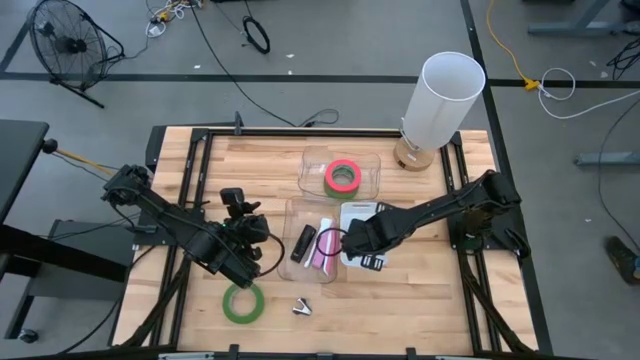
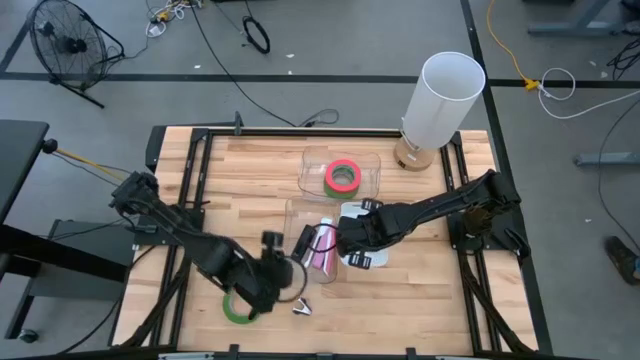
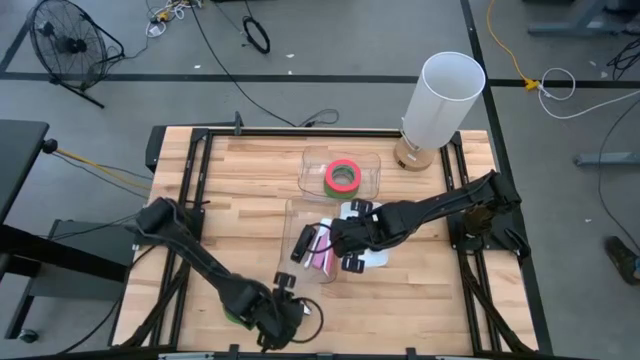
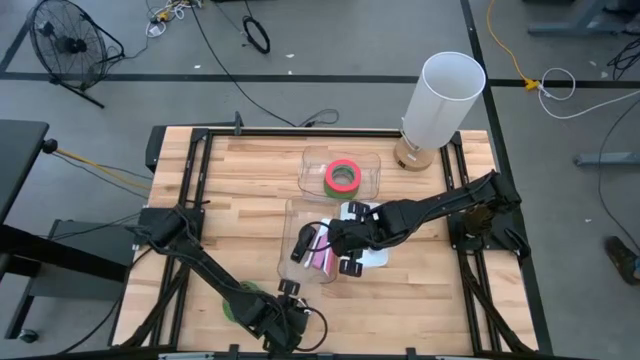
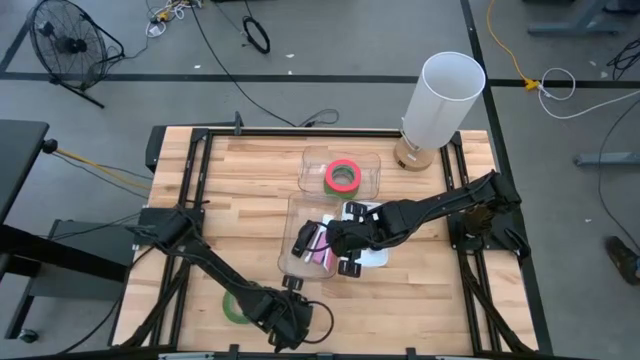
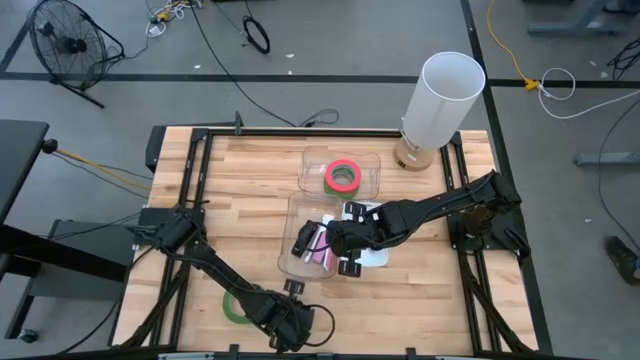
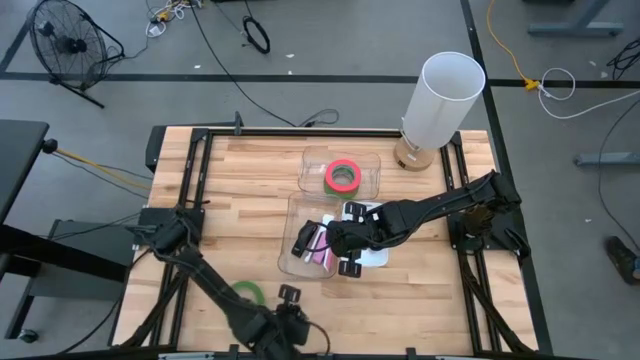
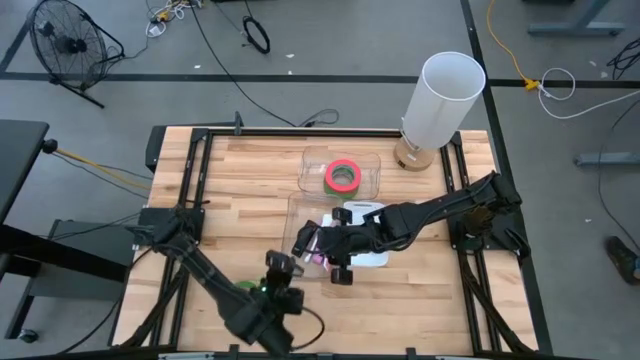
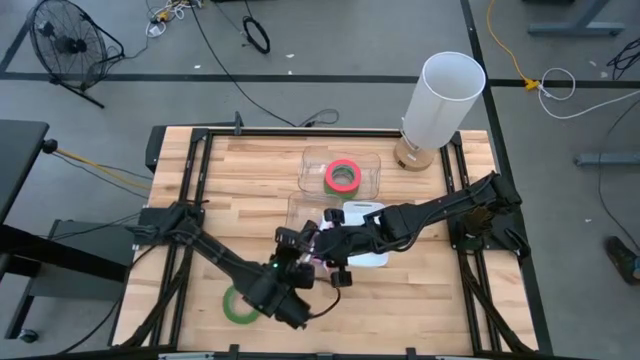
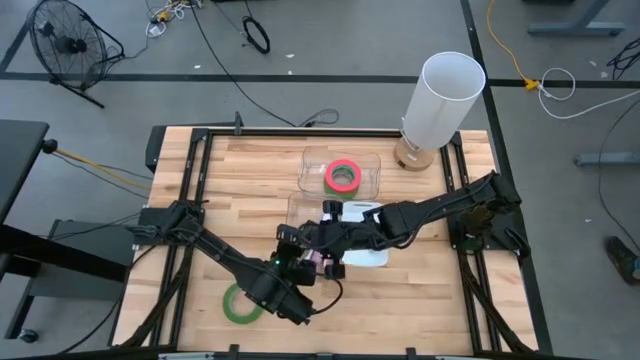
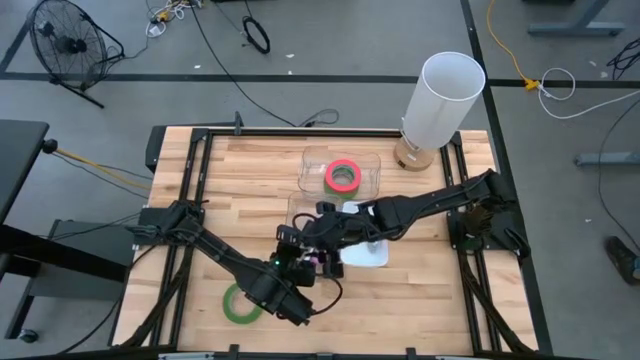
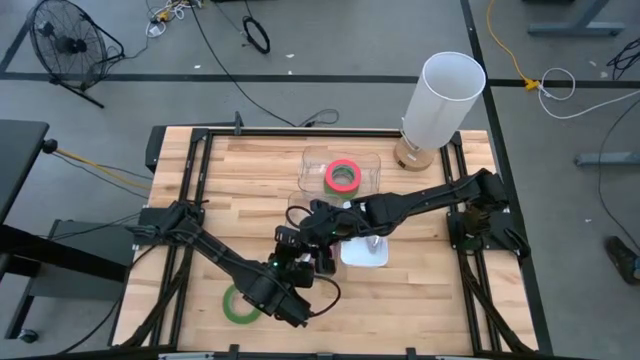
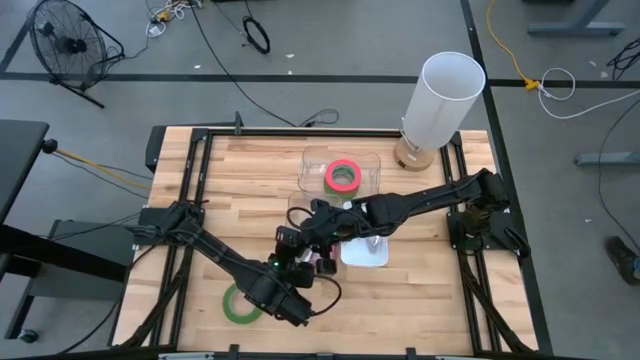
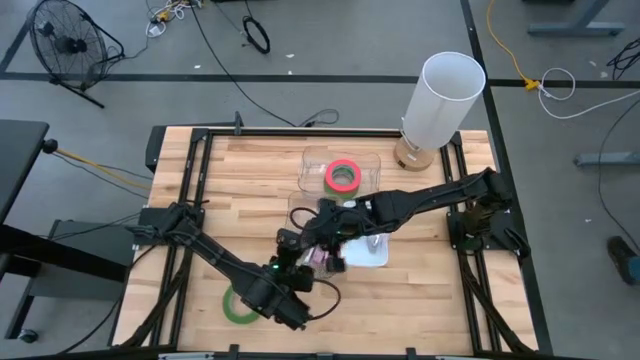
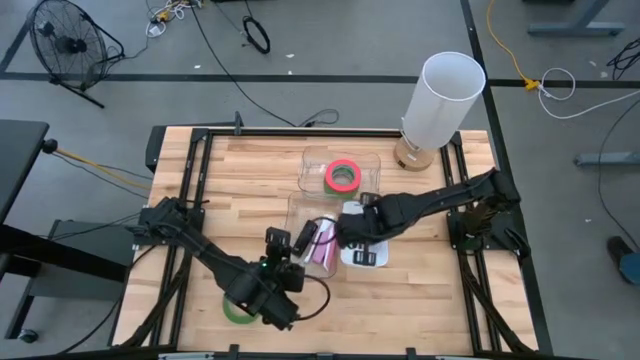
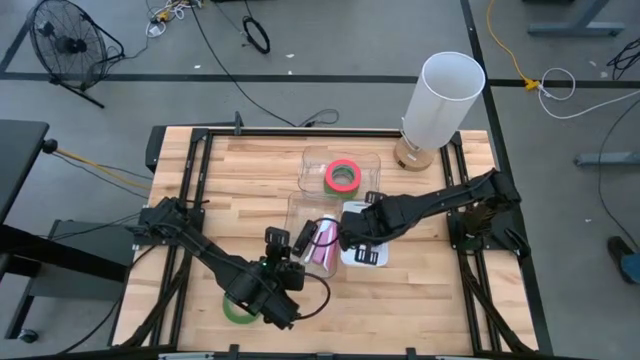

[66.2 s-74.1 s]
Task: Pick and place Stapler, Stapler remover, tape
Put the black staple remover into the white bin

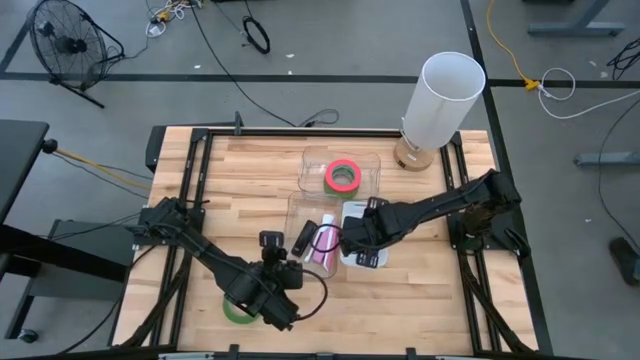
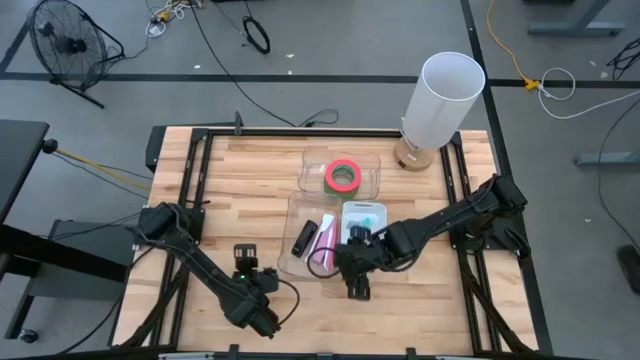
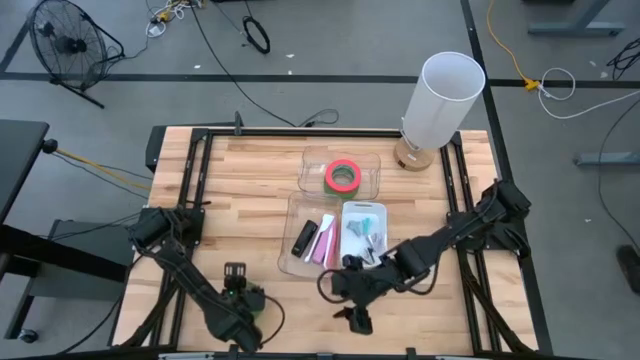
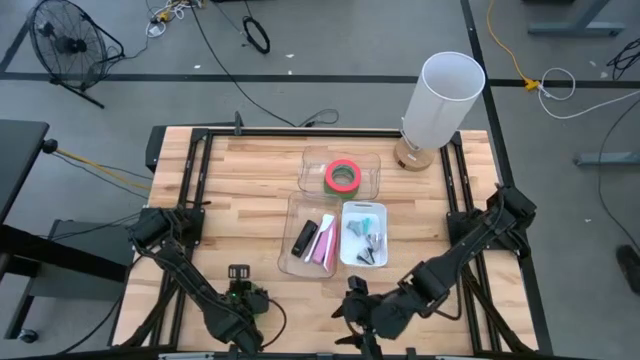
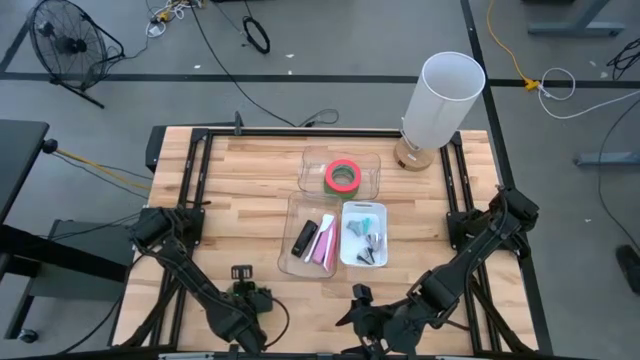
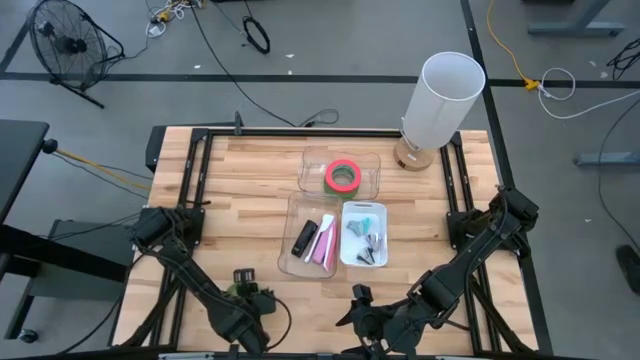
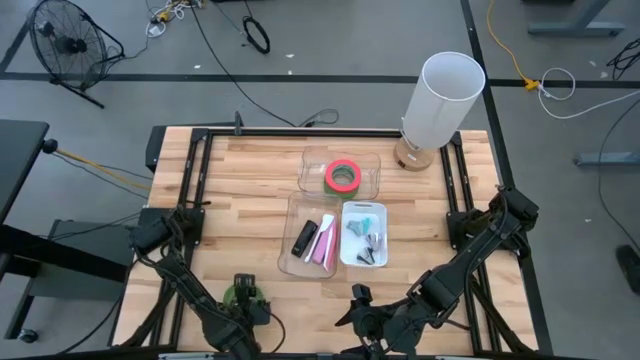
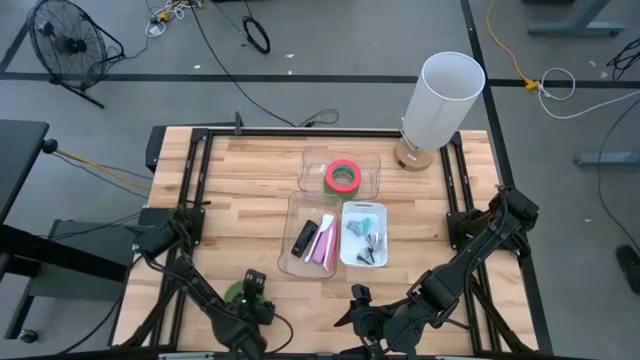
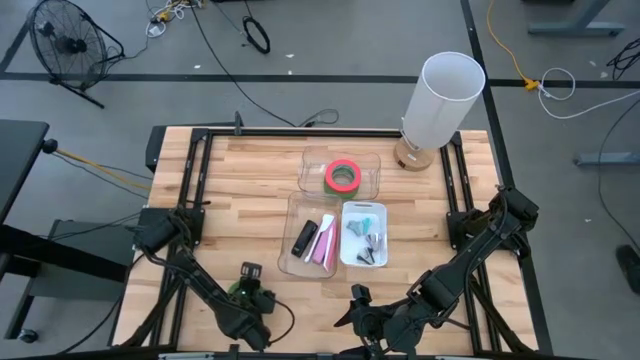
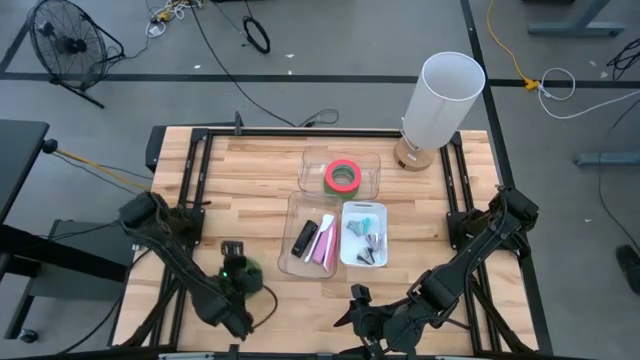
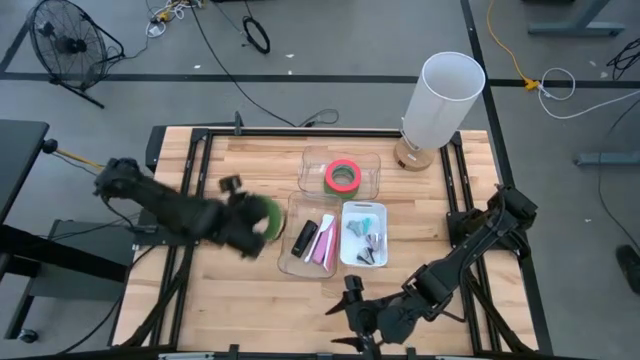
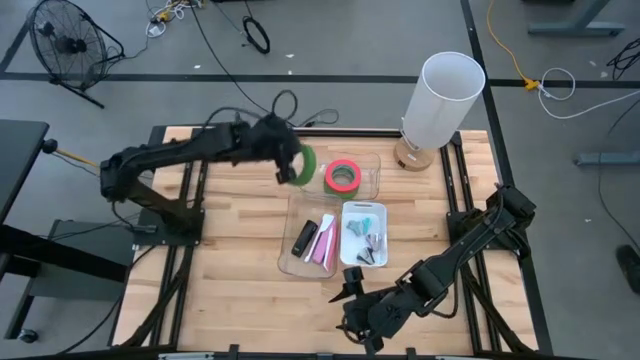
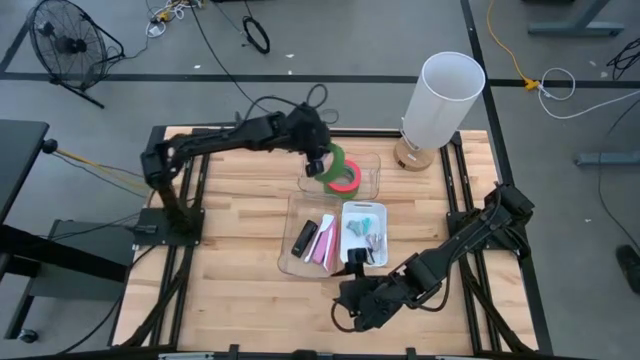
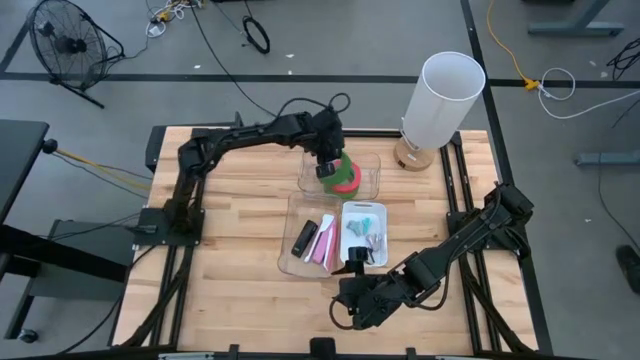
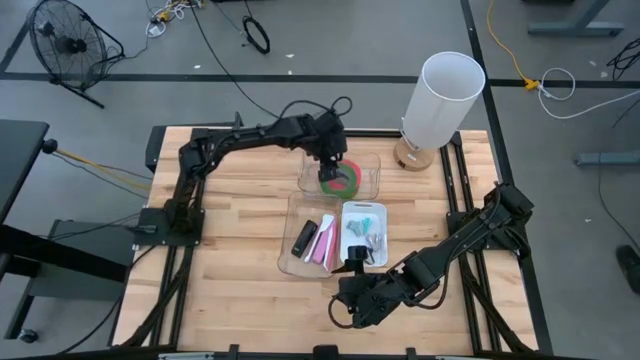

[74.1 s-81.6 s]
Put the green tape into the top transparent bin

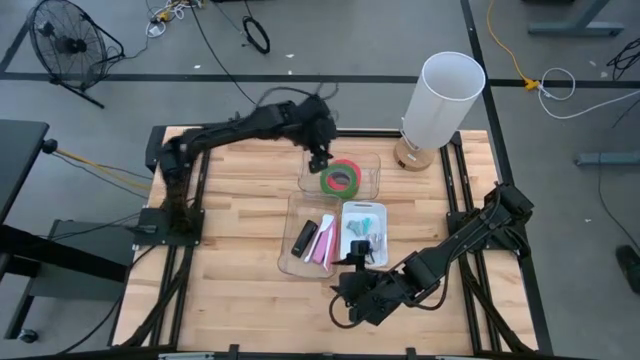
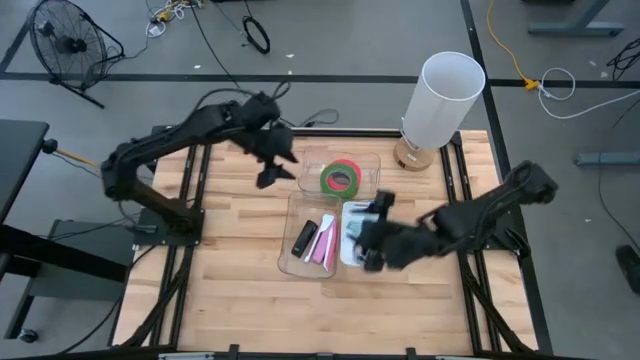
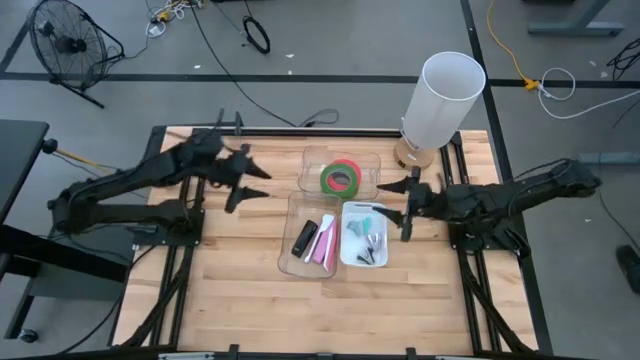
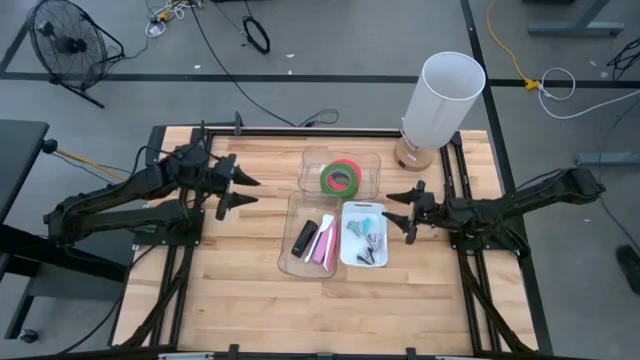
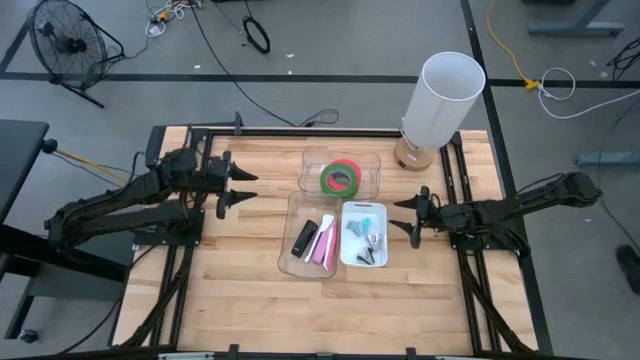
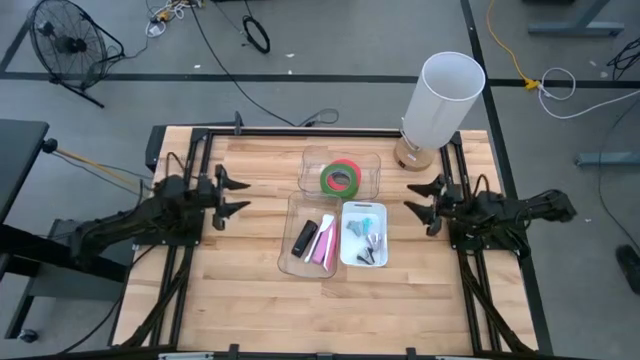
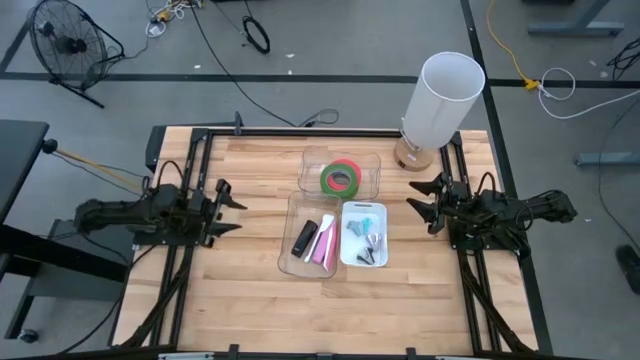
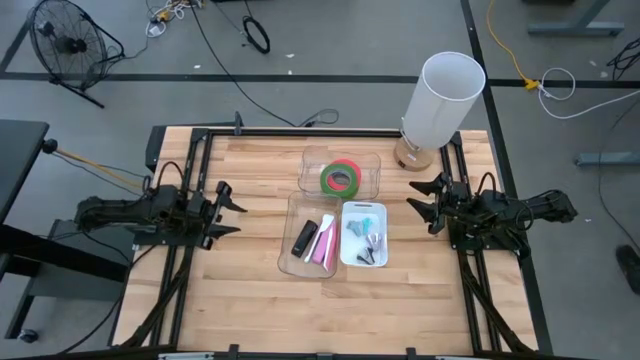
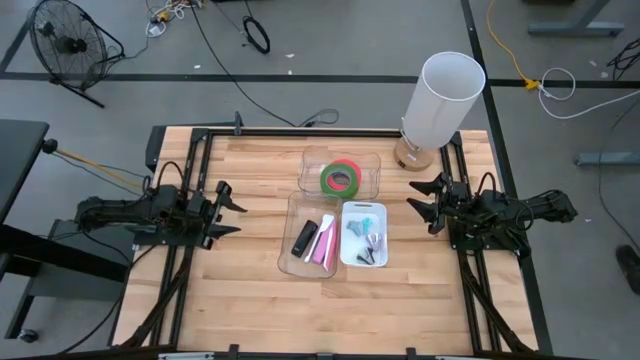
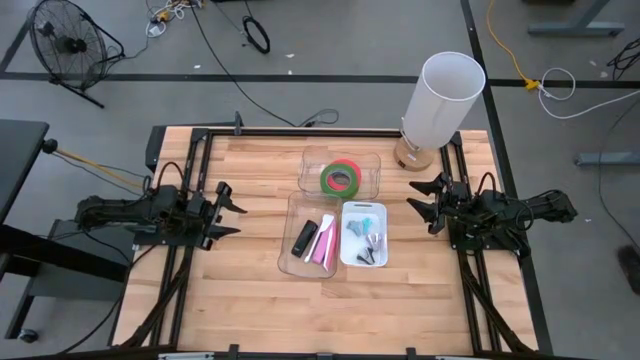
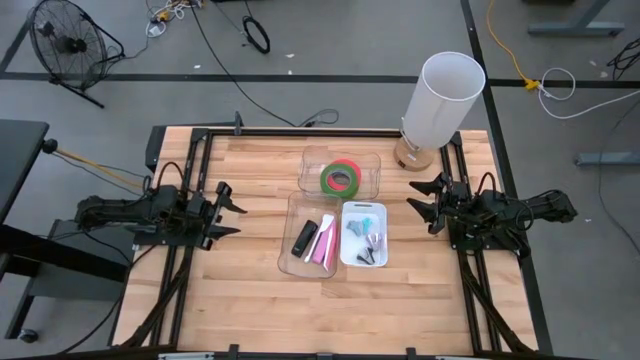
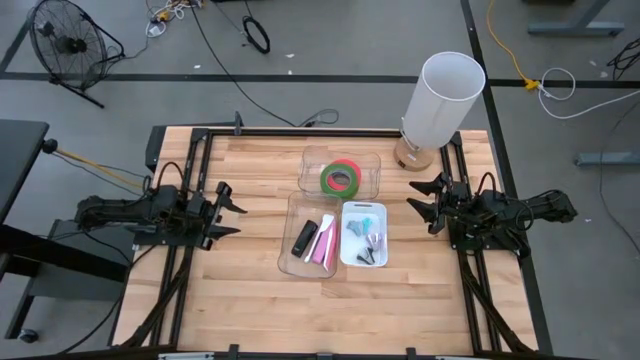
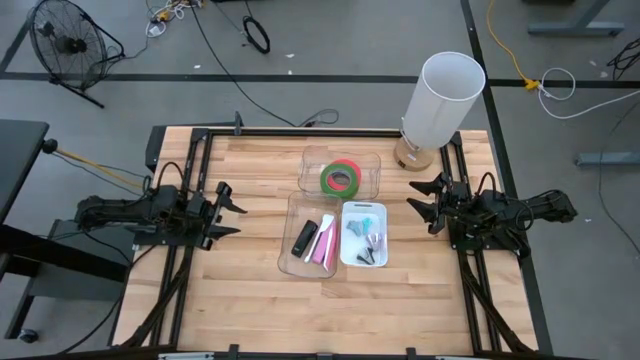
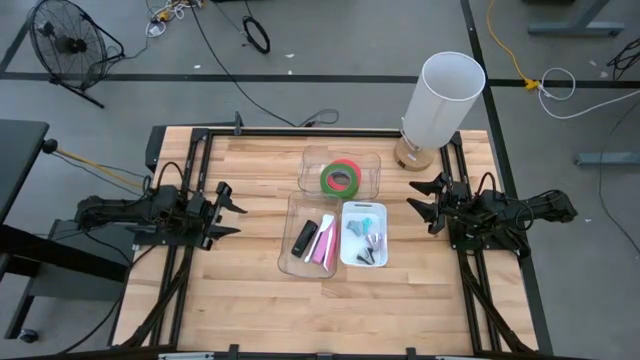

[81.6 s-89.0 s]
Return to Home Position
